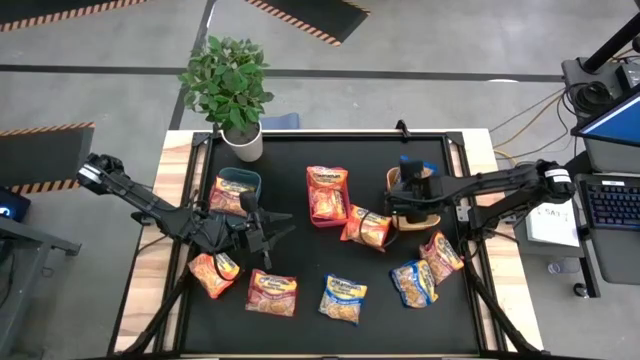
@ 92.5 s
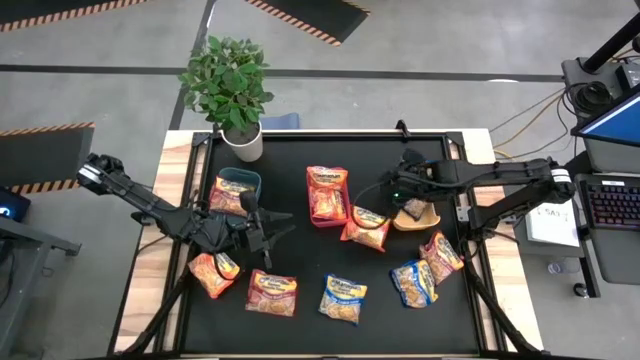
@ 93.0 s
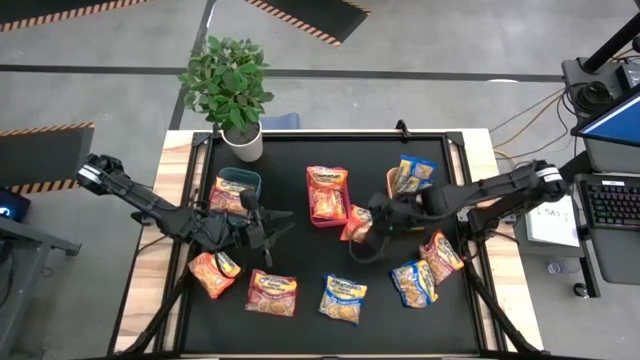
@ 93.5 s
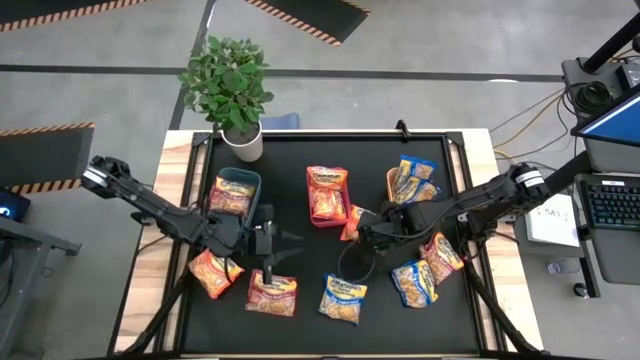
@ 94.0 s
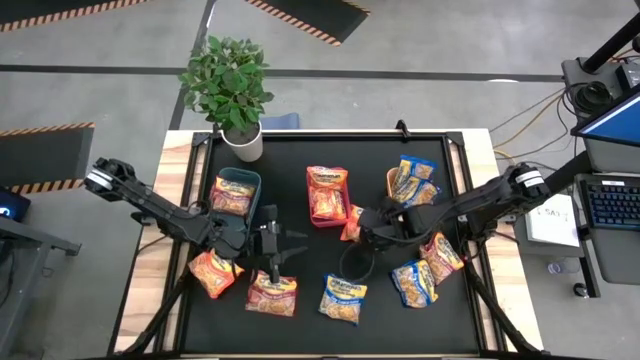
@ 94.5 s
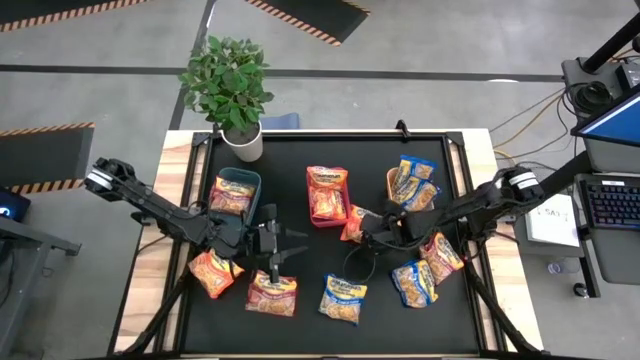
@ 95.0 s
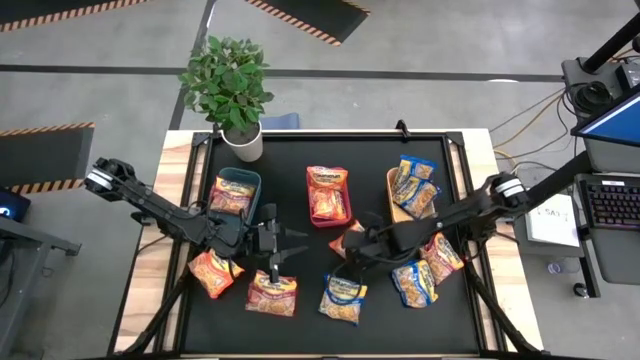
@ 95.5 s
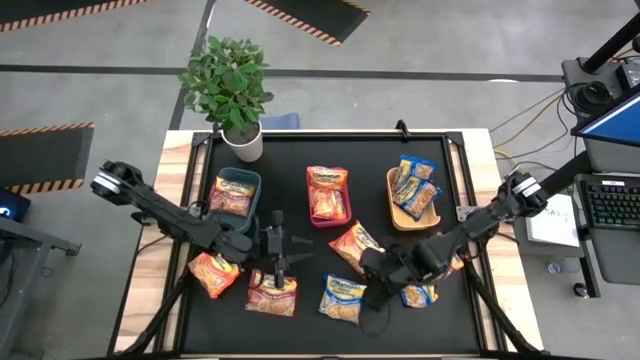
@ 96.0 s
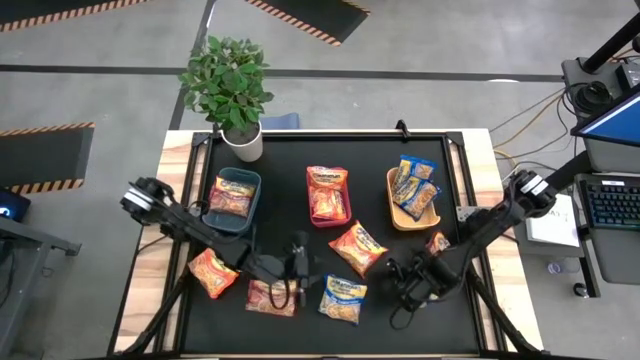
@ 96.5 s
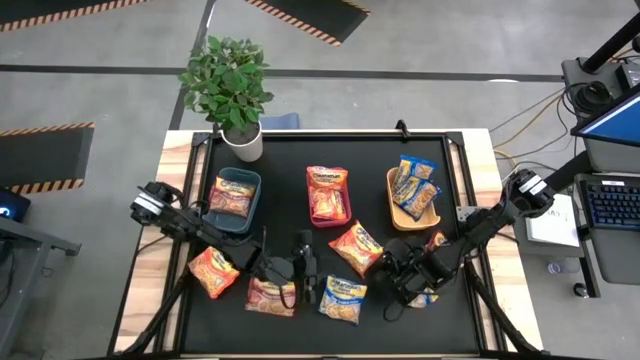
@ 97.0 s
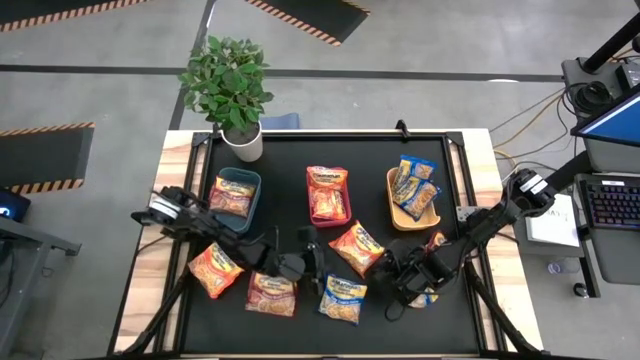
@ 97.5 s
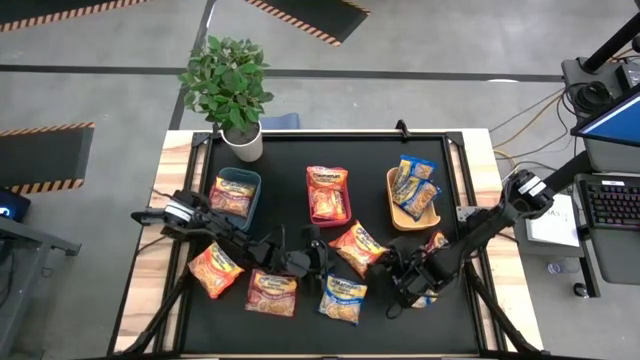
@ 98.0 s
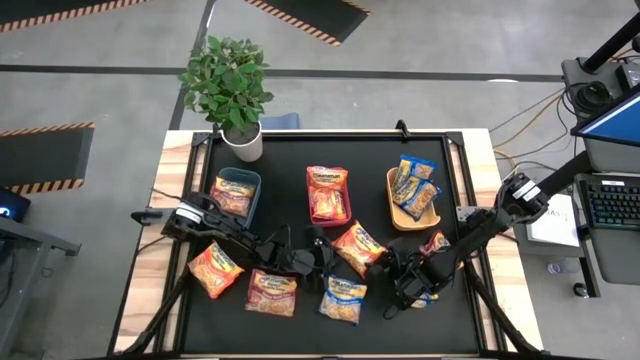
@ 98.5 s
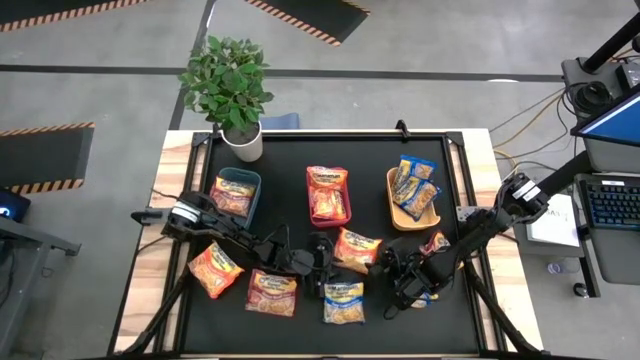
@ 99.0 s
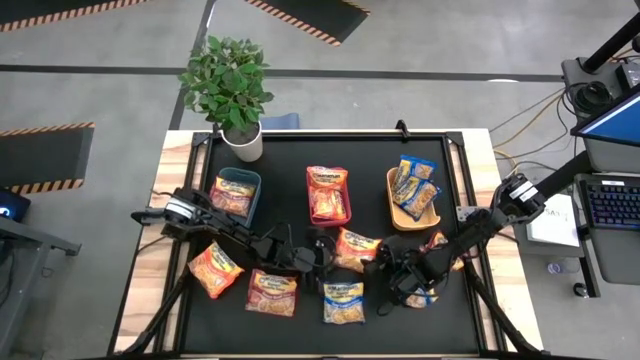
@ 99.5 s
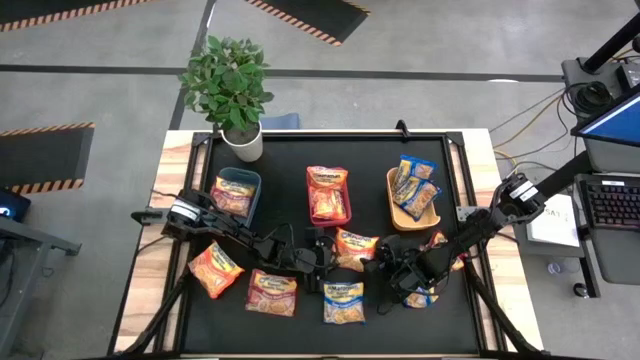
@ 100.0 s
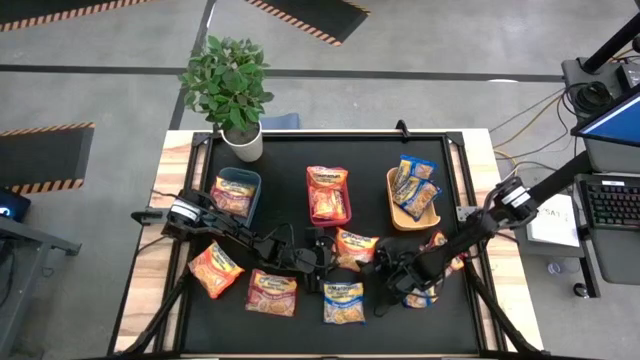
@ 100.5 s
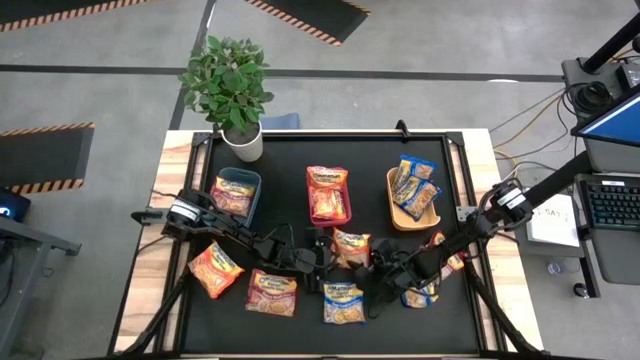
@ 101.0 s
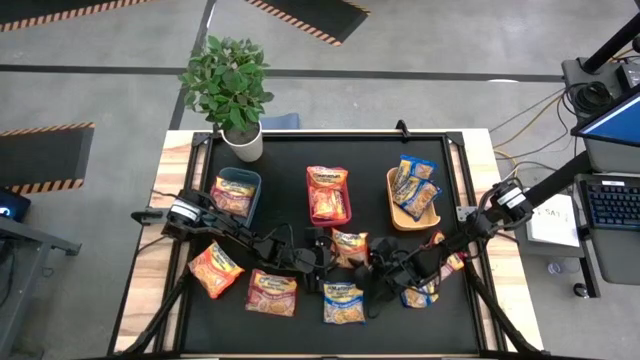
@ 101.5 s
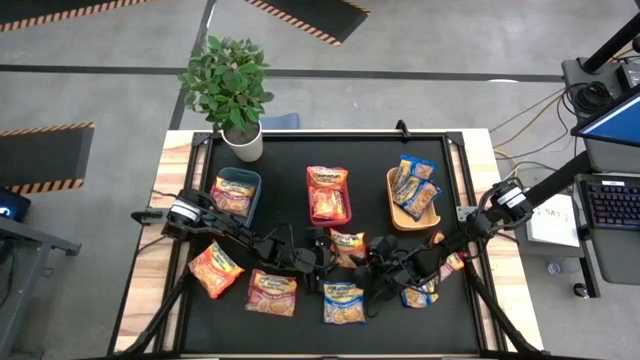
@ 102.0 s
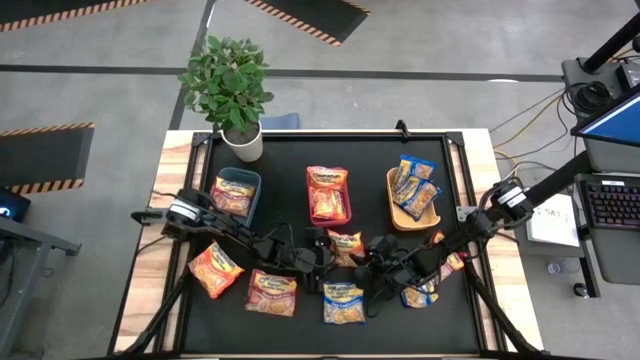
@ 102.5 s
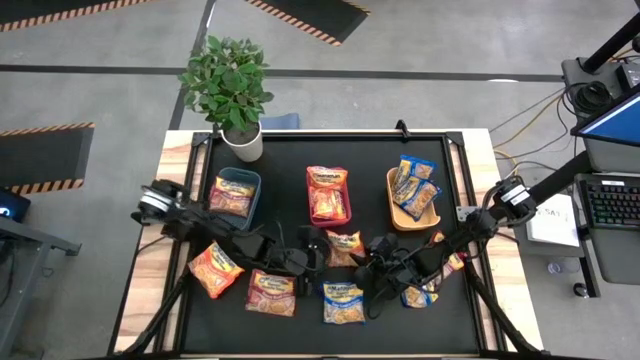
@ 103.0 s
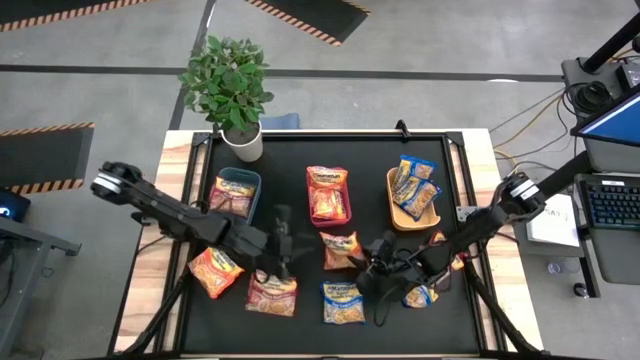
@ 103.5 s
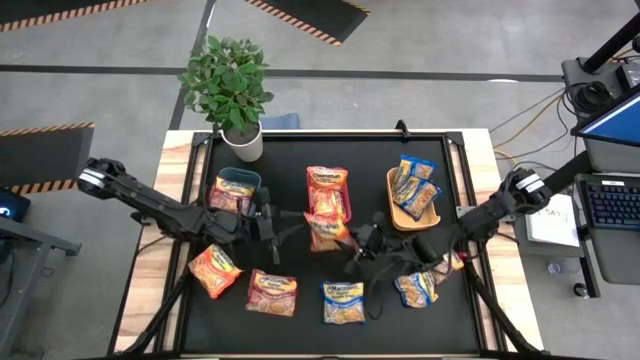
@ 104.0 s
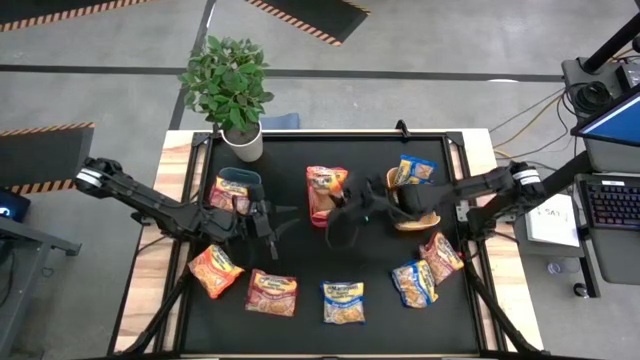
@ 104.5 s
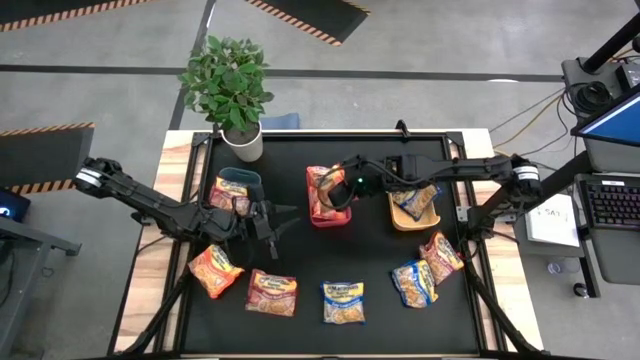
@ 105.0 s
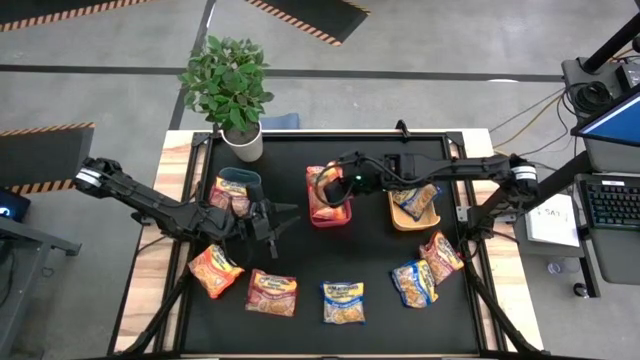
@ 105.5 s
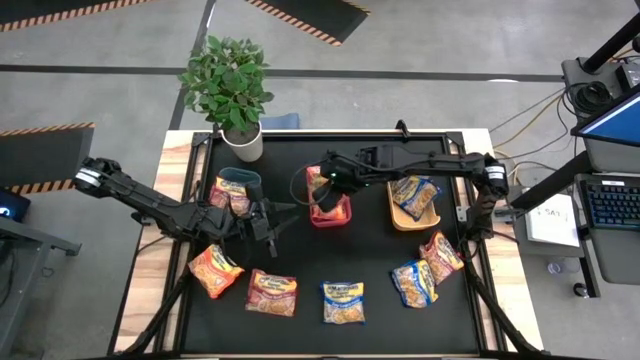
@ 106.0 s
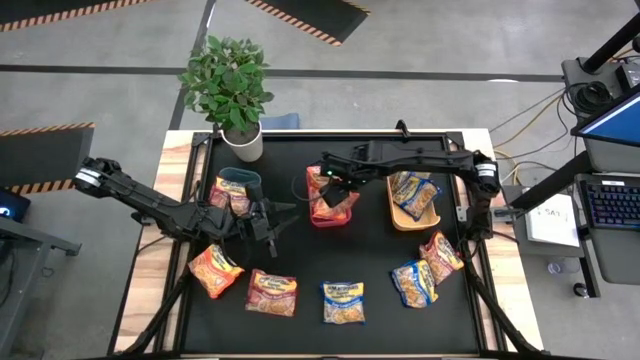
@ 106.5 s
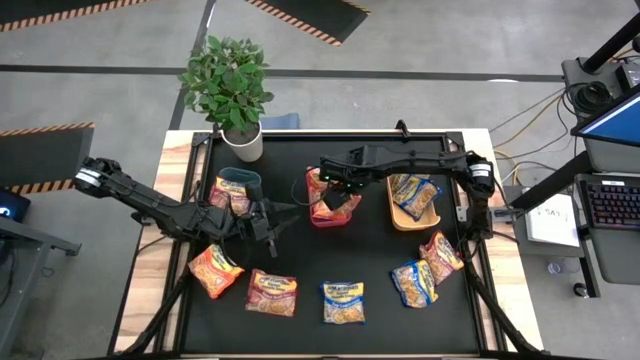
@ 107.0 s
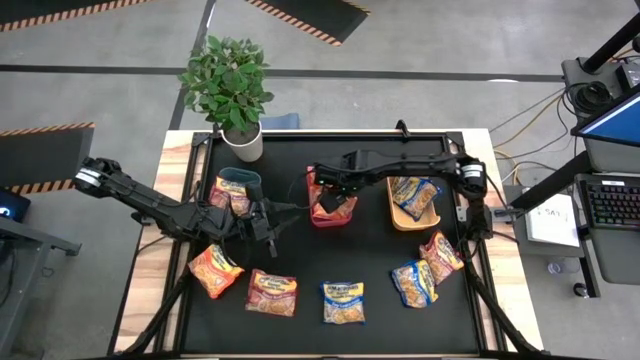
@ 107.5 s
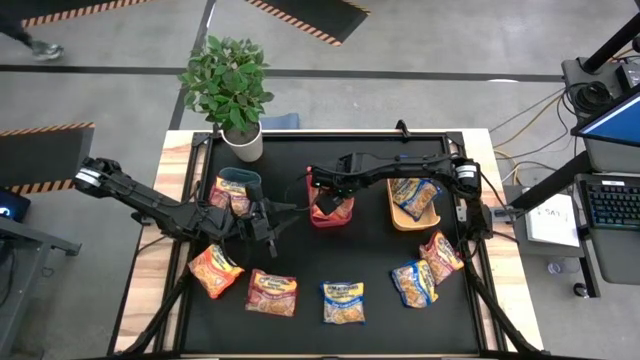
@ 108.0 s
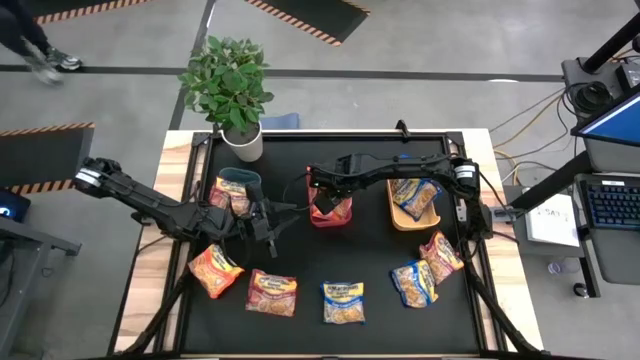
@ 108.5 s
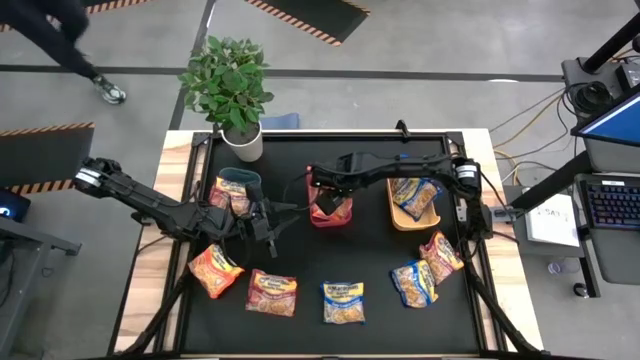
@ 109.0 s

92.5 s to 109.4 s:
Task: Sort Maruchan noodles
Put the orange noodle pack into the red bin

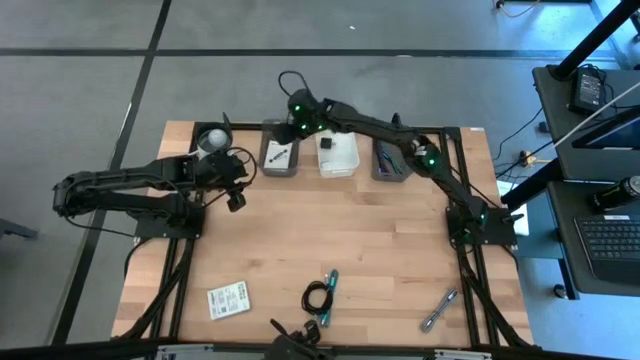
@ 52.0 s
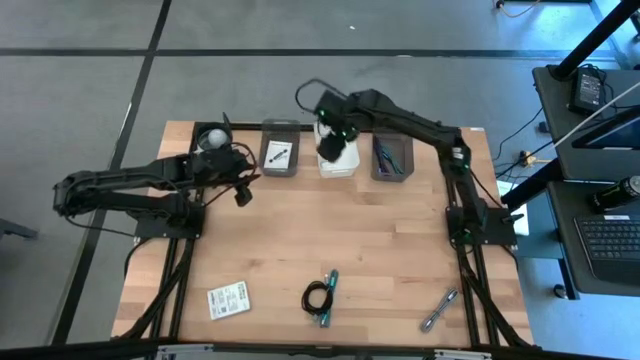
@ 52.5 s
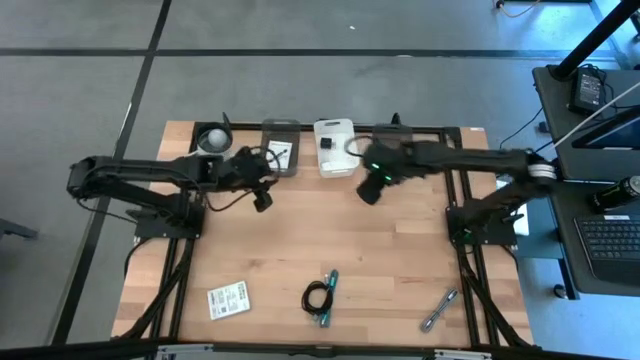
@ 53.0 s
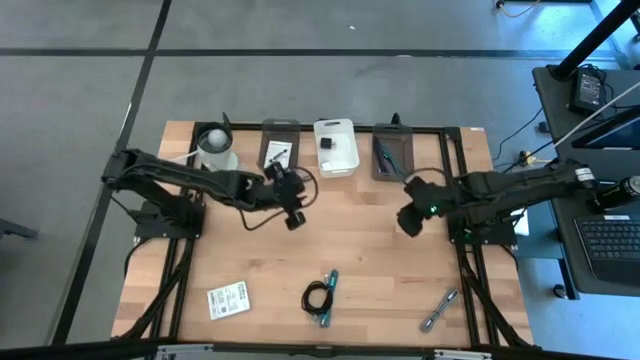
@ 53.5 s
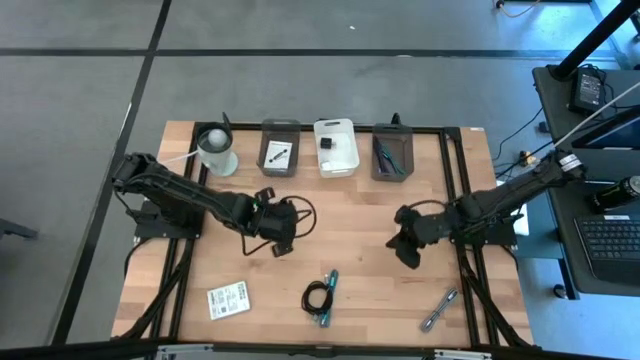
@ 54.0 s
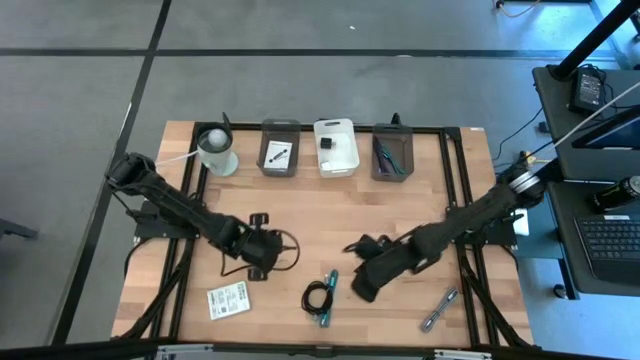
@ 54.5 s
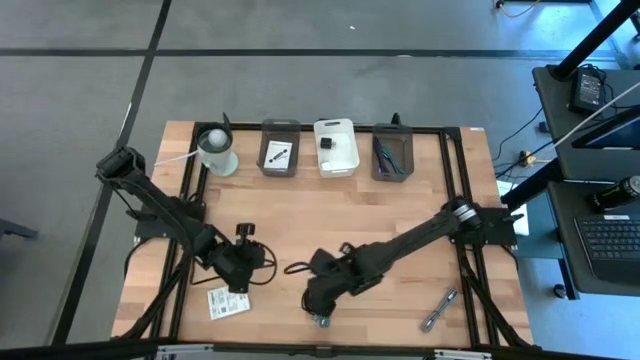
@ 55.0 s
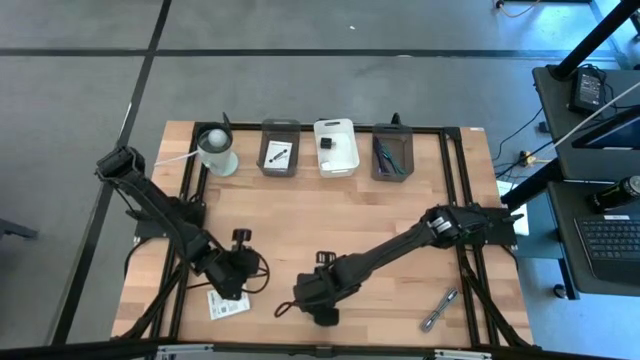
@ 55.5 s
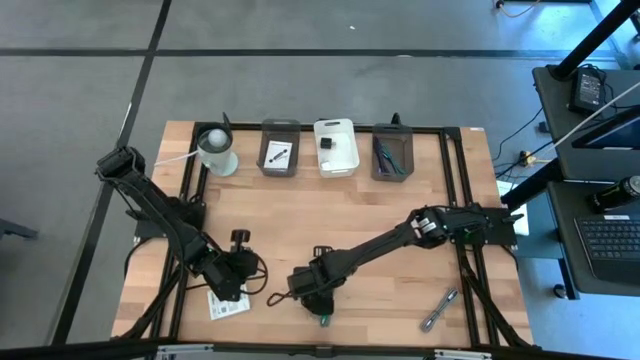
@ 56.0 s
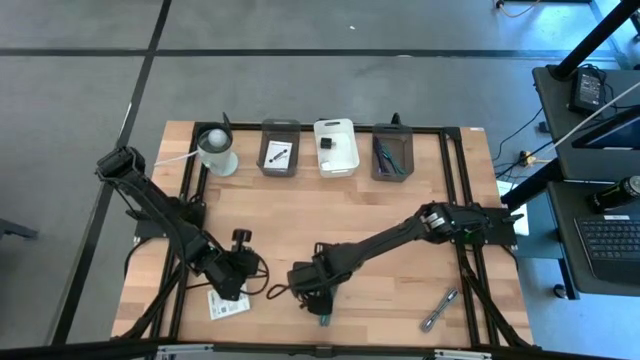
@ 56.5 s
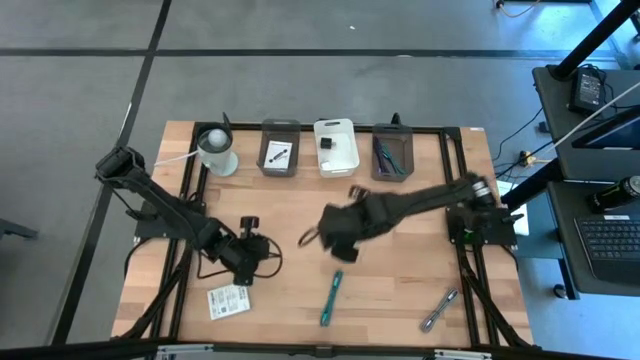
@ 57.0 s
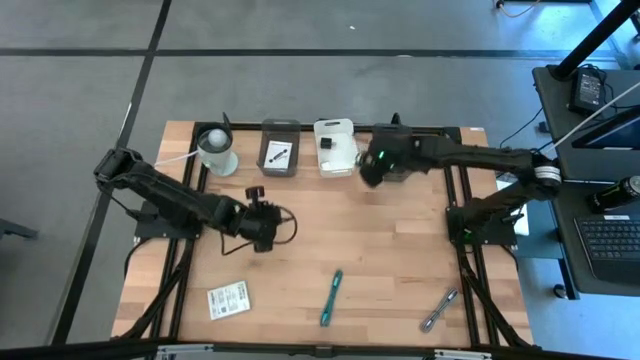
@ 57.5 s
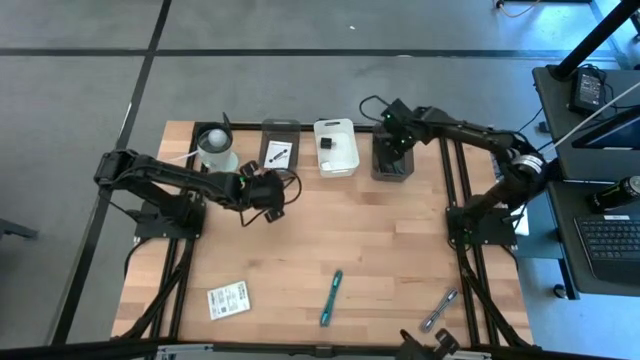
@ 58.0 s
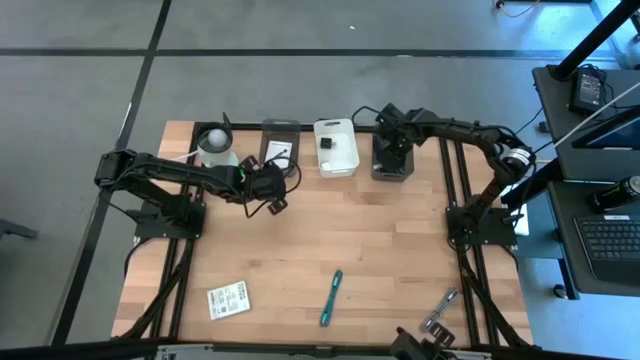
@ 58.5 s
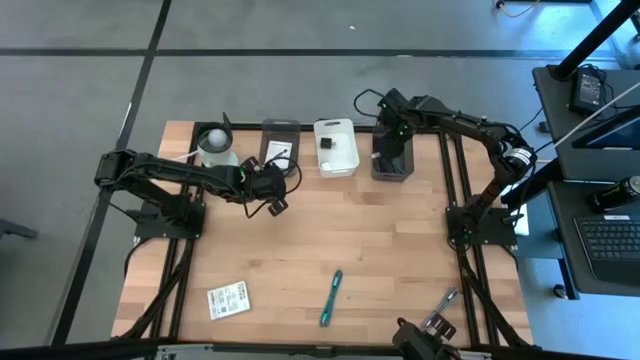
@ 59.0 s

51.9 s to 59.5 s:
Task: Pick and place items into bin
Put the black charger cable into the right black bin
